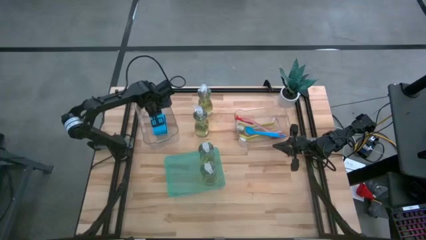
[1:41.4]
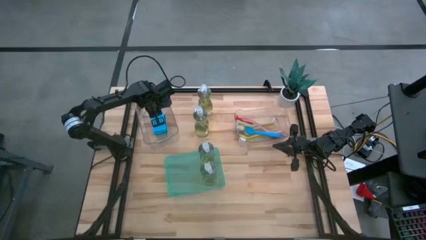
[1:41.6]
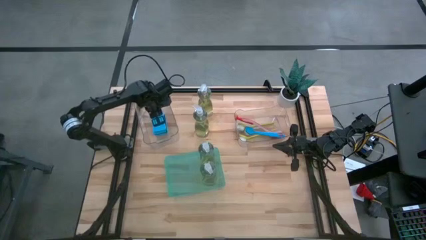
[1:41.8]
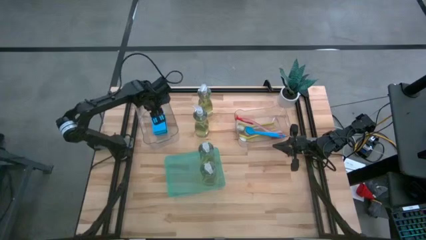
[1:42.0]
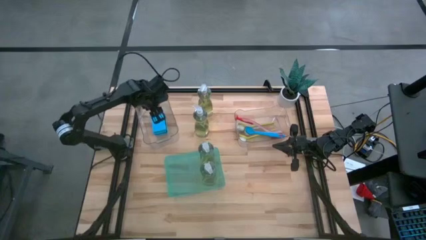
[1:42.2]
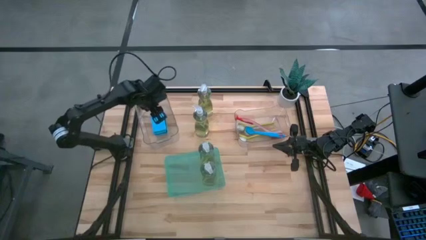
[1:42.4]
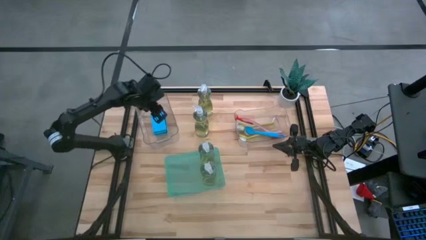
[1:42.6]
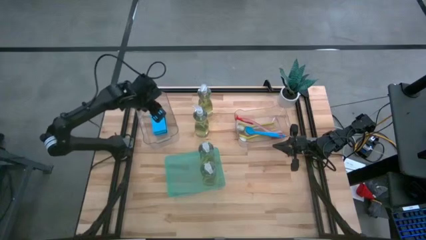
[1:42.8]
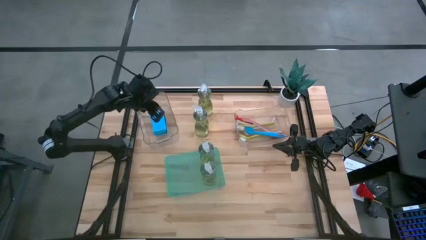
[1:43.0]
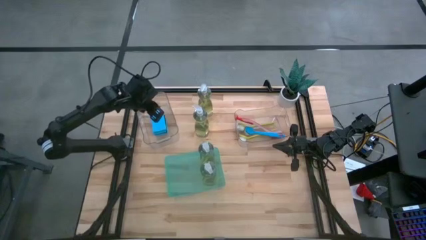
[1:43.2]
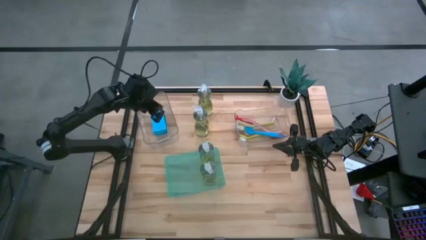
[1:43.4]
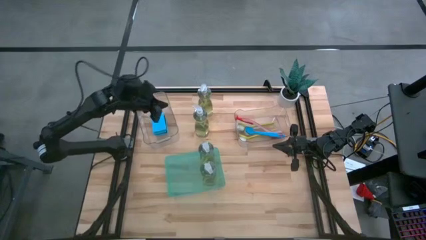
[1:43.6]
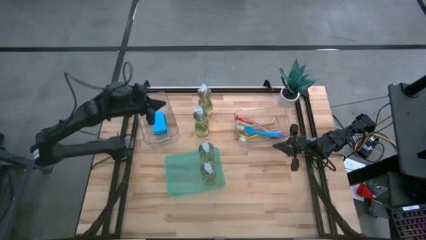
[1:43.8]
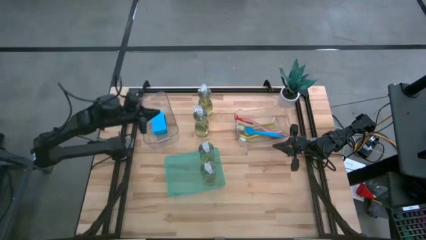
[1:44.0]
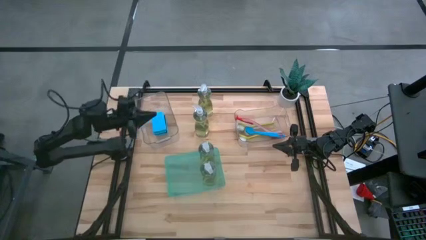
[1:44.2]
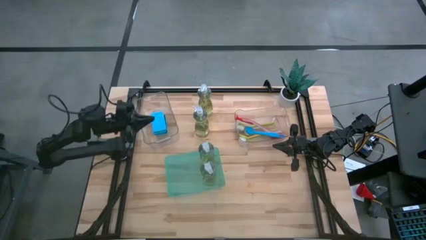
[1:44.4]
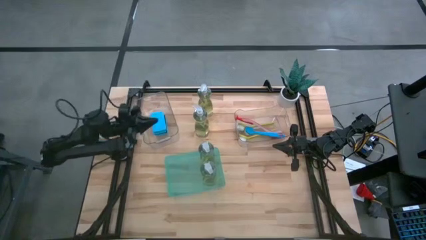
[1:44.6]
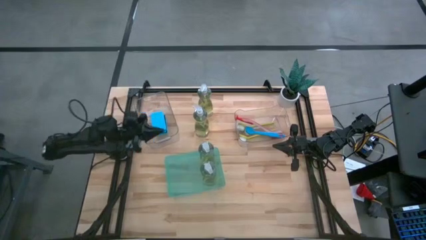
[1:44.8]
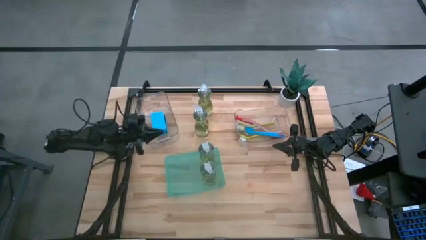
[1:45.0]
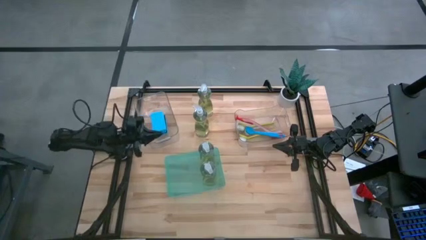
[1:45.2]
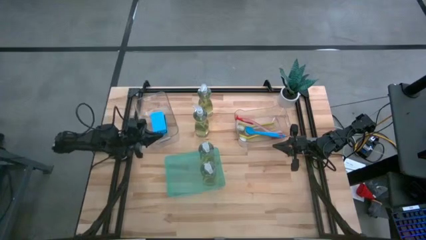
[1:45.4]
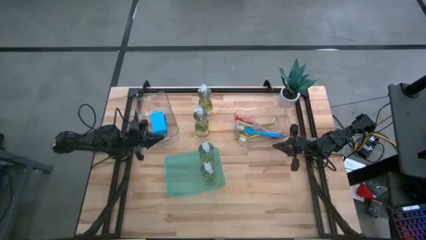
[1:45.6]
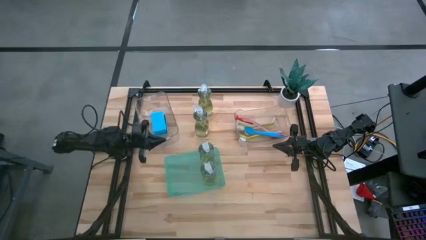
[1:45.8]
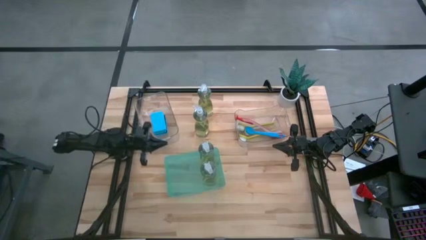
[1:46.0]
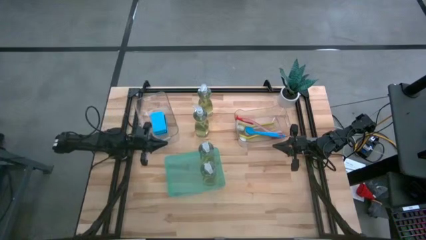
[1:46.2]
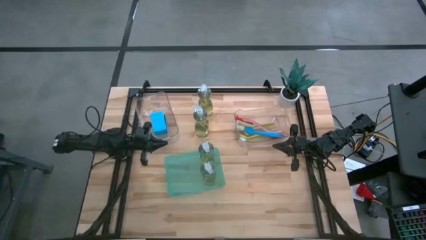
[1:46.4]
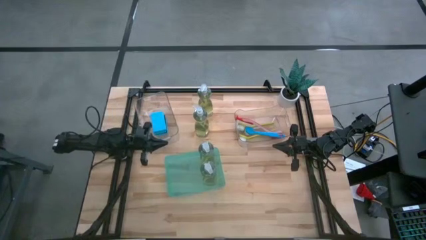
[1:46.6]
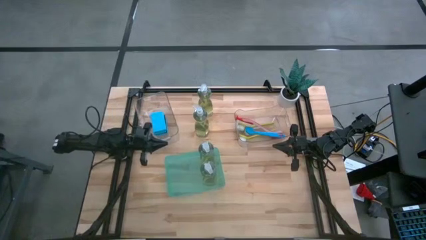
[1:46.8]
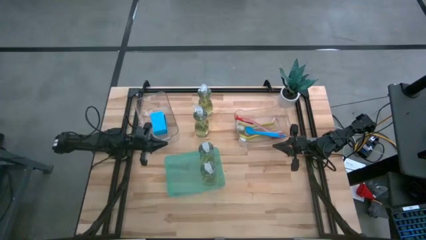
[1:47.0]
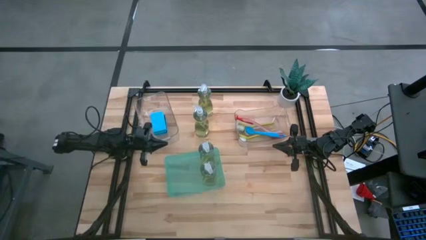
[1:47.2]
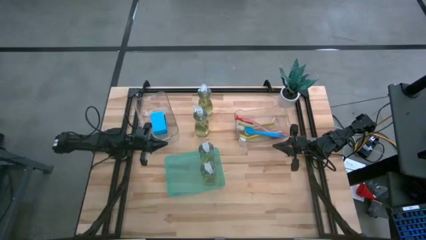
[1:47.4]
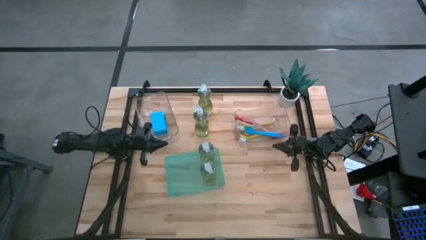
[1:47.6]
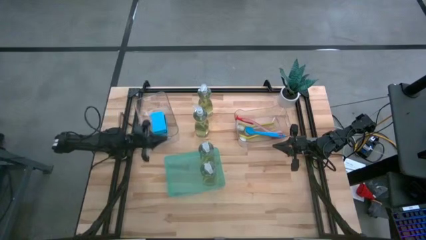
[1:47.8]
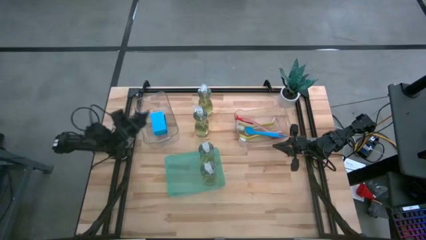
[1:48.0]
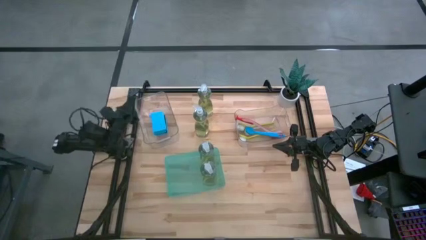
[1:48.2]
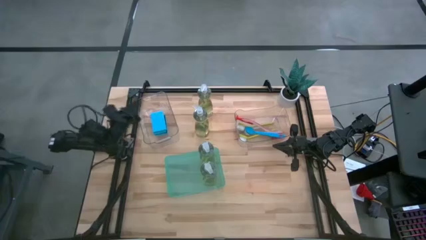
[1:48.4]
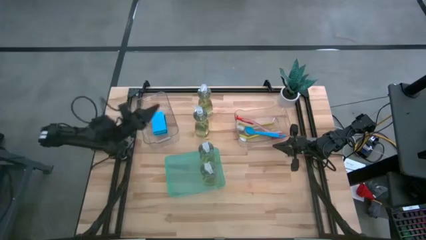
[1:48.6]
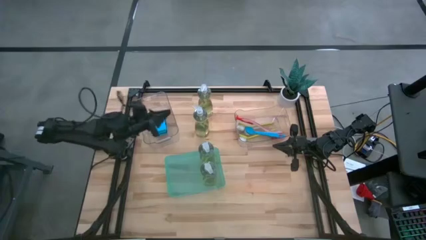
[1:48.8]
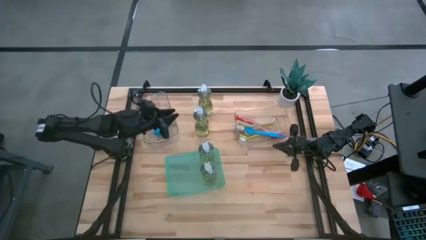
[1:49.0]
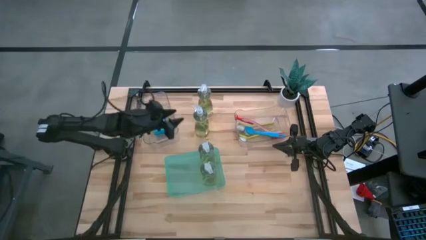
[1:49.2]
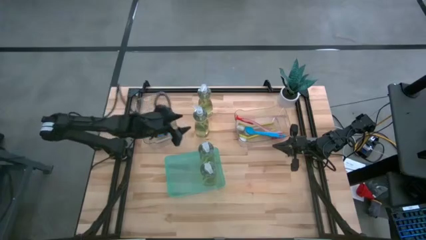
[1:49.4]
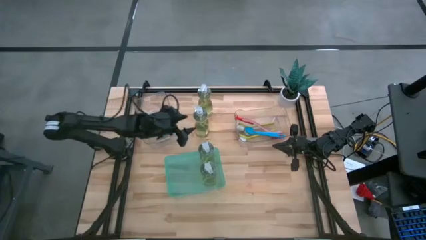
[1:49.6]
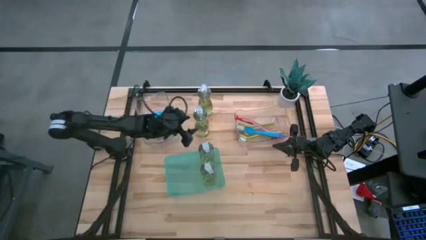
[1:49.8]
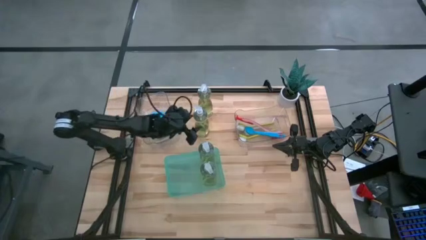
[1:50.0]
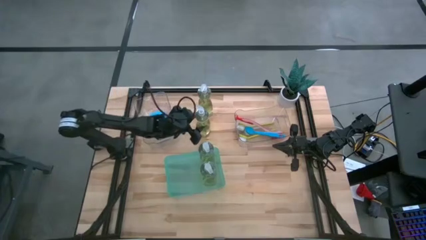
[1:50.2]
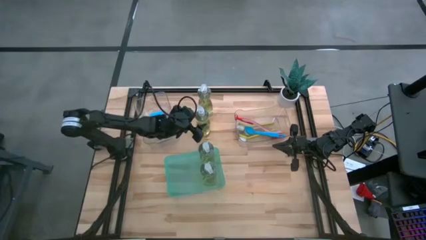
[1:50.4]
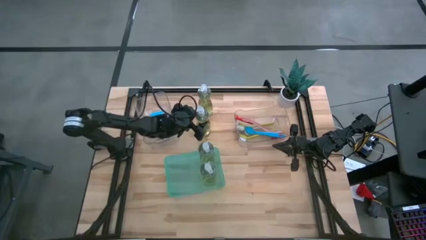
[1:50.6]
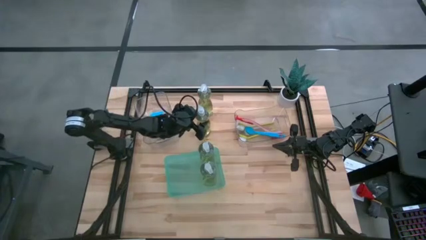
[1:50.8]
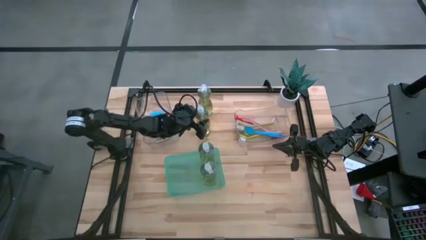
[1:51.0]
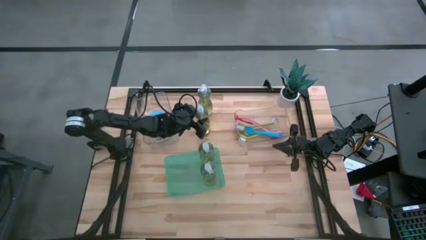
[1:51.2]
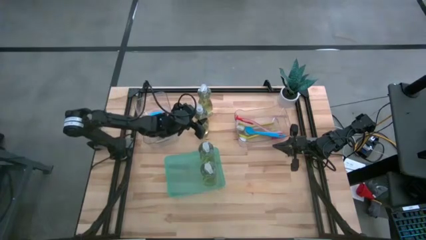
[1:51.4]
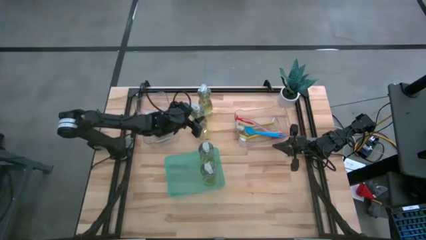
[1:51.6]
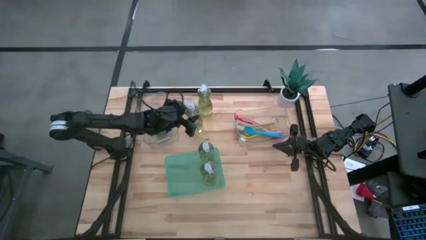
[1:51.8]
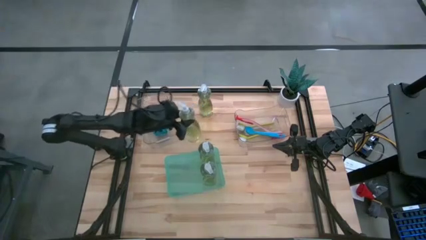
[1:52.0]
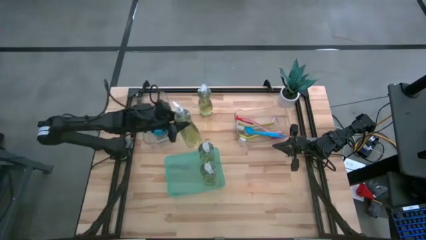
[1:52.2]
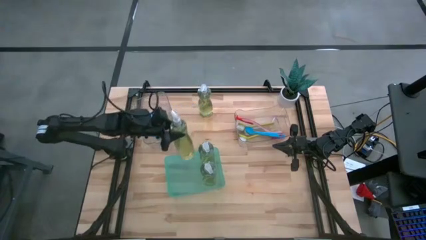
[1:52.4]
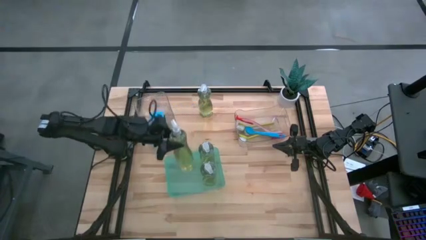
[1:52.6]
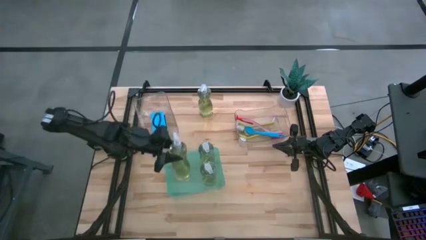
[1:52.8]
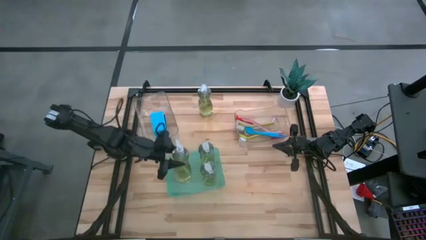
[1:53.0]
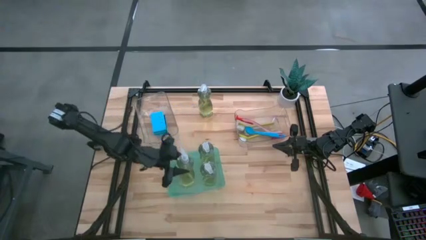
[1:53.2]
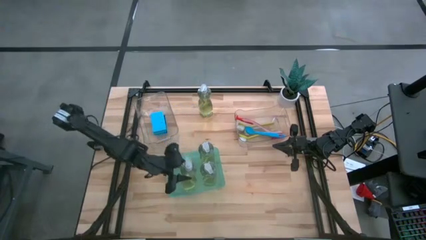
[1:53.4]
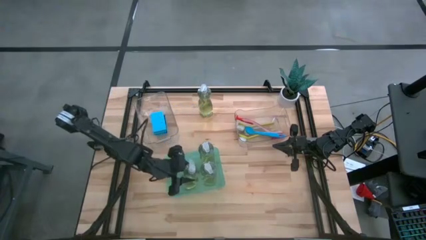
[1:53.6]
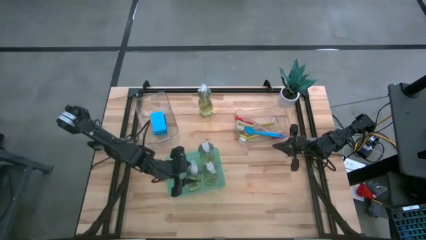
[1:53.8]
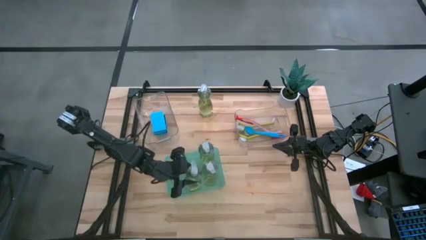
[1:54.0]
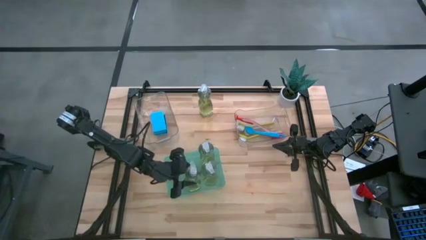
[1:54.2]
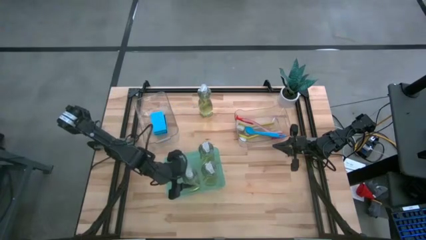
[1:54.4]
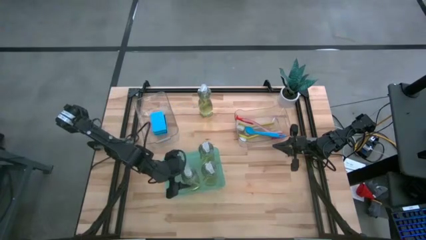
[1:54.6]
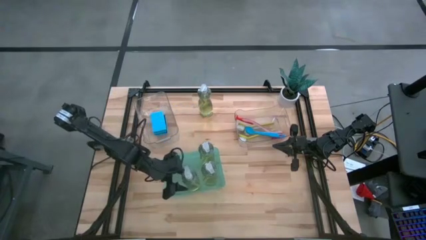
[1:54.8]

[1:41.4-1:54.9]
Task: Pick & Place Kitchen Sink Supplies
Put the green soap dispenser into the green bin

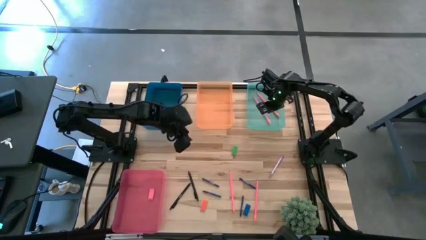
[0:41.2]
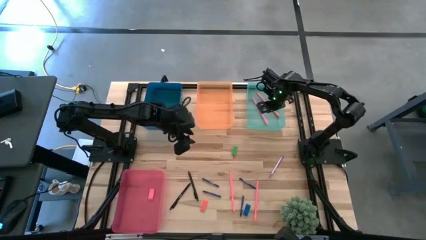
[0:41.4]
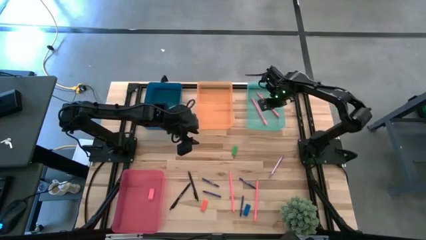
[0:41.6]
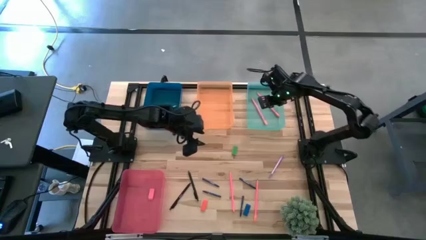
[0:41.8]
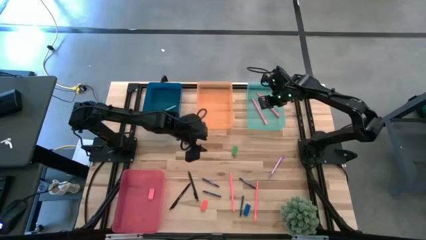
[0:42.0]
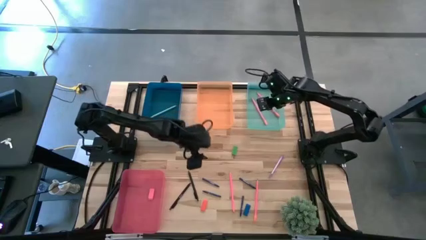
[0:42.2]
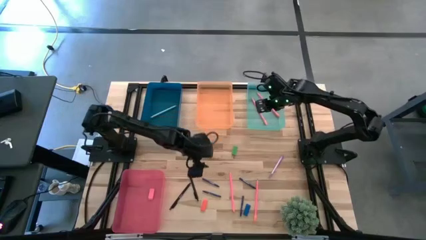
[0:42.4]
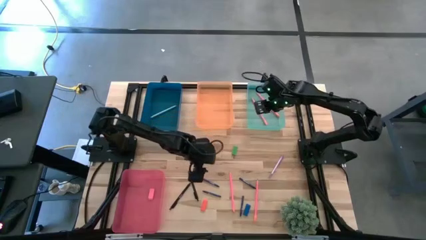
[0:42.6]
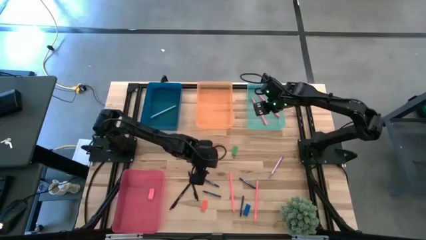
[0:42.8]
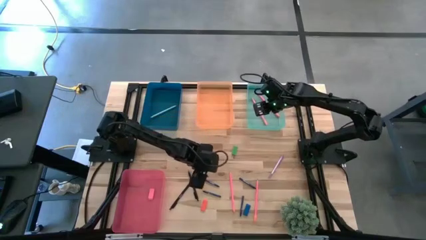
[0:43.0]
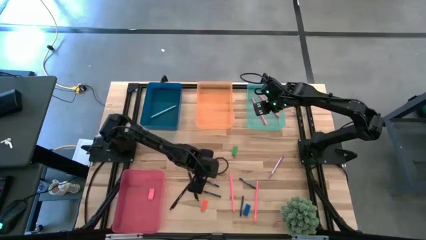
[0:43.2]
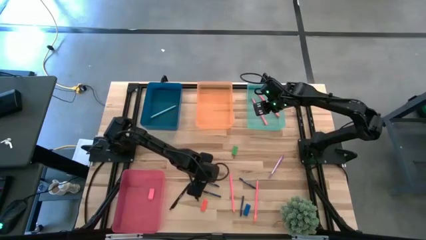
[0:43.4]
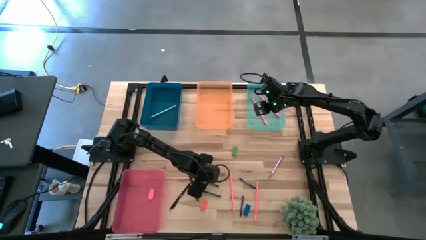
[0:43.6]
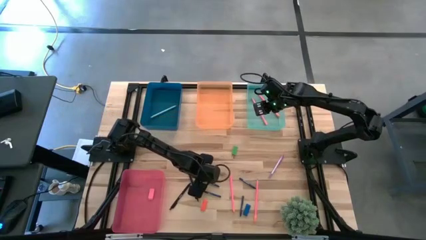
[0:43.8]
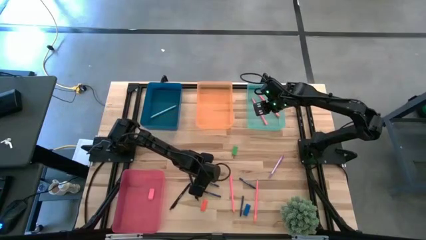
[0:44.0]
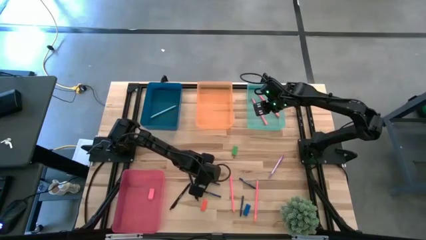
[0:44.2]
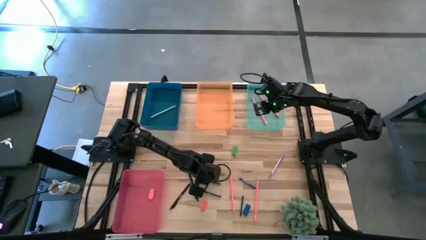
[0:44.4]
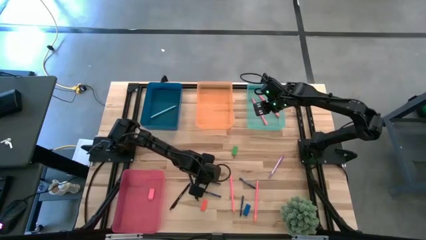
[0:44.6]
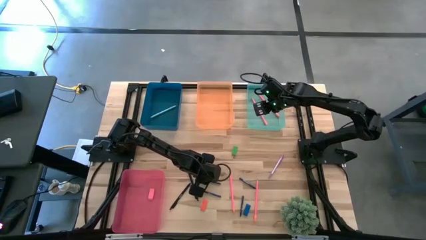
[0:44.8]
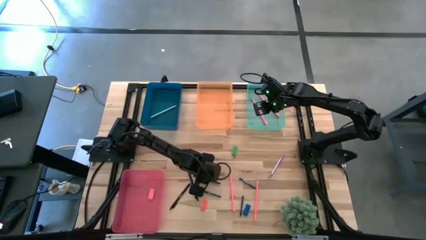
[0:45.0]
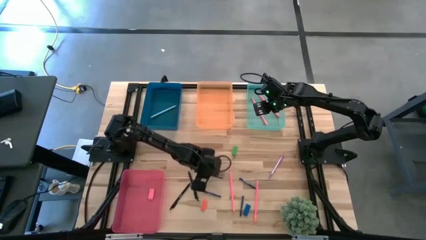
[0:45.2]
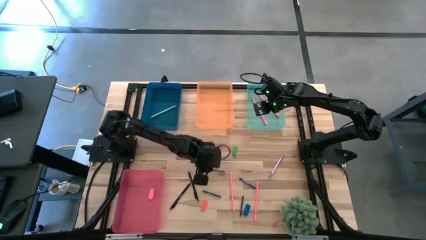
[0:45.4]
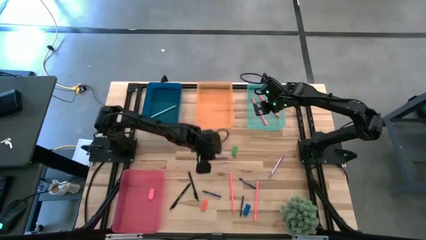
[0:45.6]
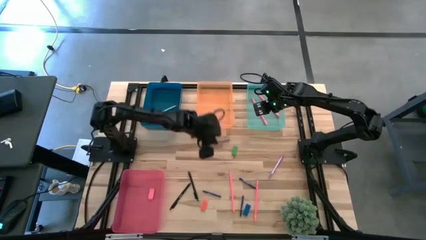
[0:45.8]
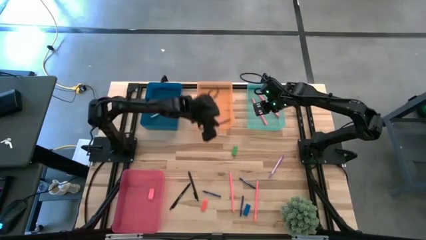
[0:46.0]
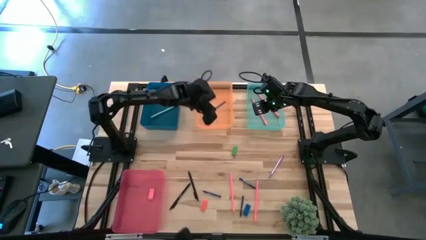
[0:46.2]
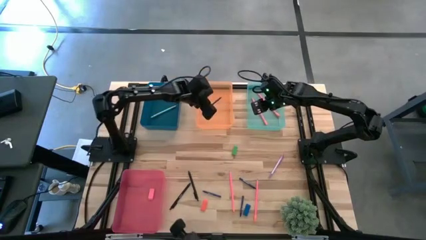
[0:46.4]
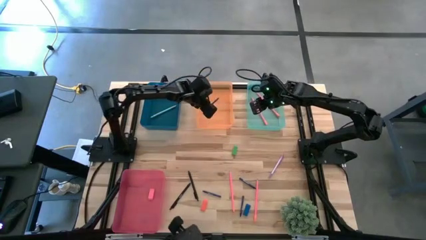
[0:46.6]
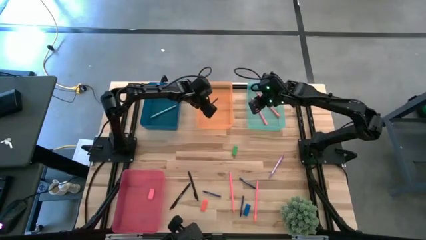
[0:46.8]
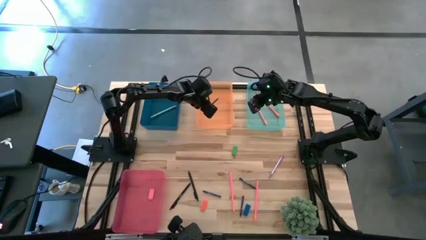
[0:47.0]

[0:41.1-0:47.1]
Task: Sort crayons/erasers/pens/pencils in bins
Put the blue crayon into the orange bin
